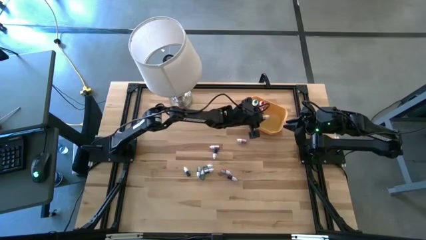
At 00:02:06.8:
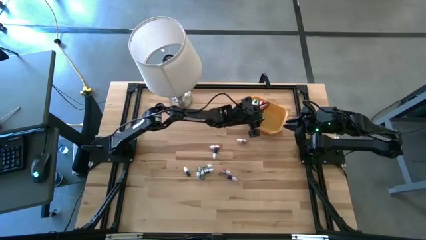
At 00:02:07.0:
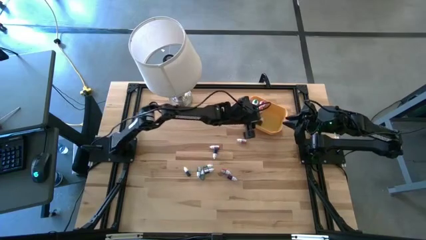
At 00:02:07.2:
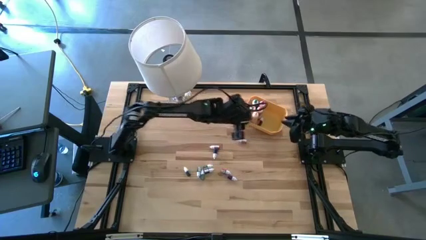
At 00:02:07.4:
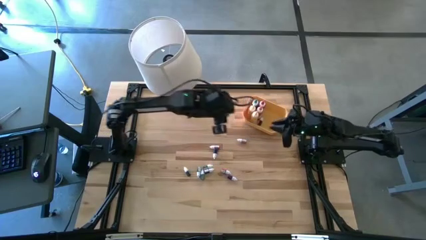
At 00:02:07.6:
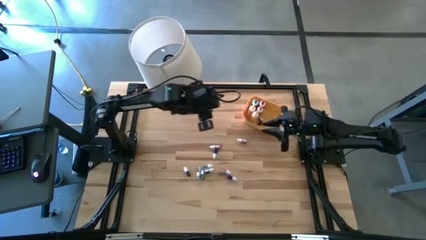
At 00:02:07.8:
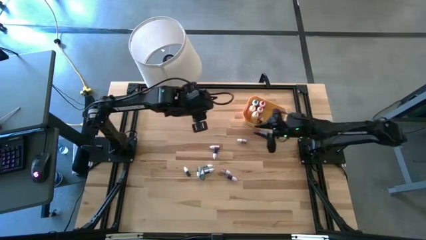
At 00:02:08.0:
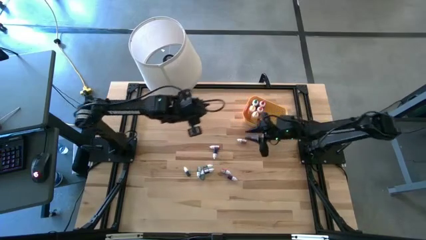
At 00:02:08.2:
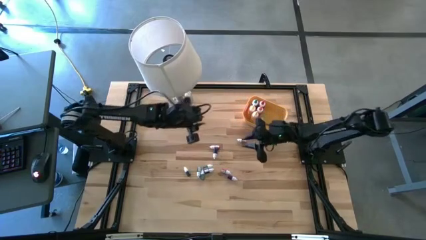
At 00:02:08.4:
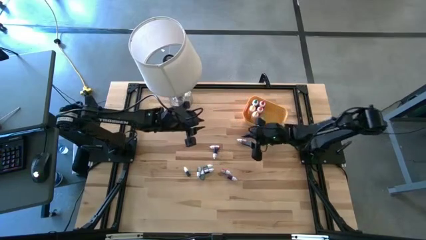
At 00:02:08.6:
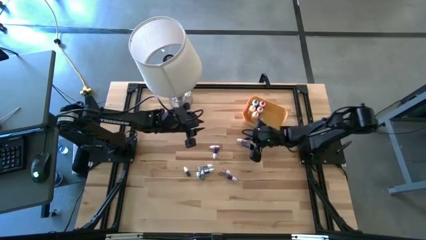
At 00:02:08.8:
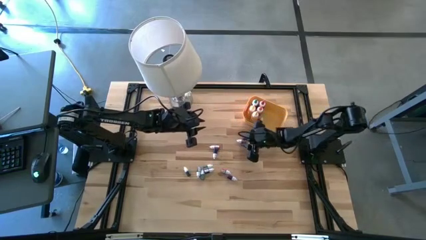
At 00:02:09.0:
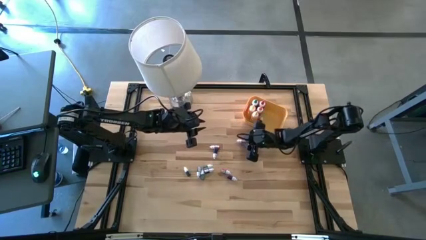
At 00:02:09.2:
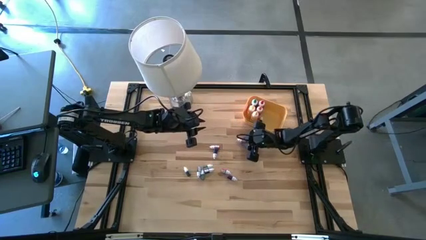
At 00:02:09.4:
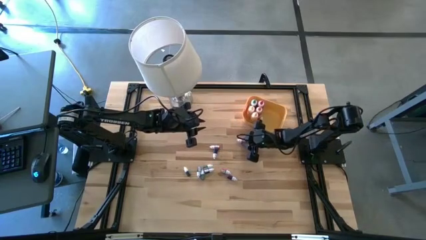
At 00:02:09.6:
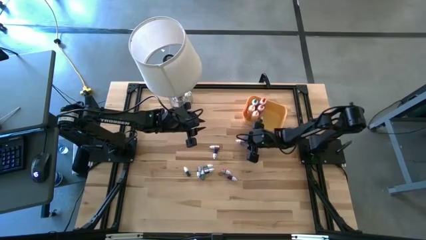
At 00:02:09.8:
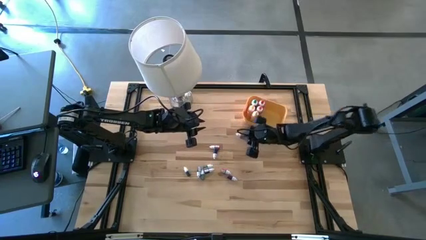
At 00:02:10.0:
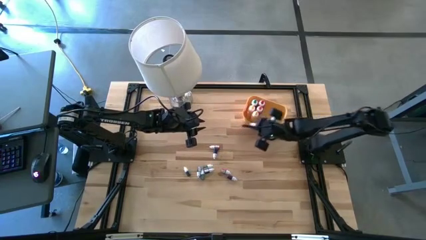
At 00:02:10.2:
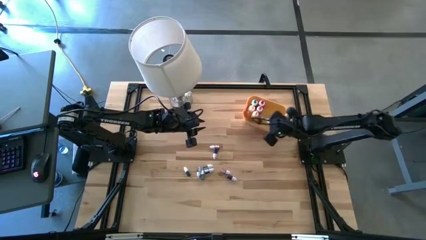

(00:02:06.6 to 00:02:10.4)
Task: Pick & Place food coloring
Put the small yellow food coloring bottle into the yellow bin

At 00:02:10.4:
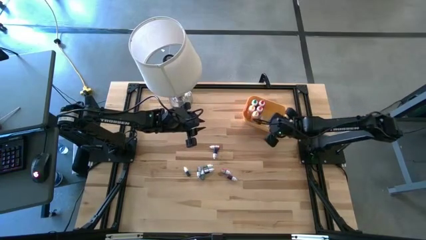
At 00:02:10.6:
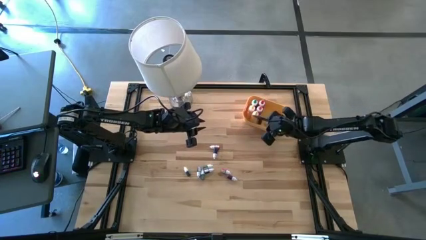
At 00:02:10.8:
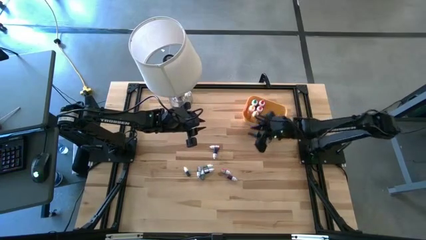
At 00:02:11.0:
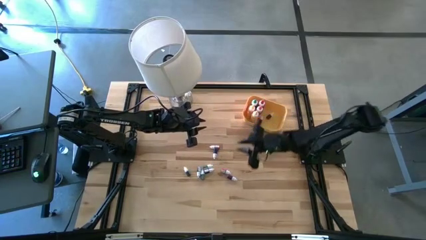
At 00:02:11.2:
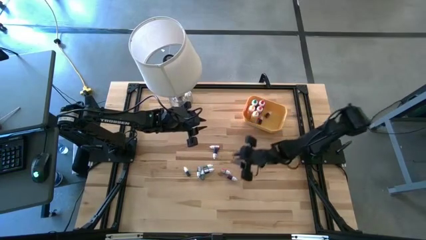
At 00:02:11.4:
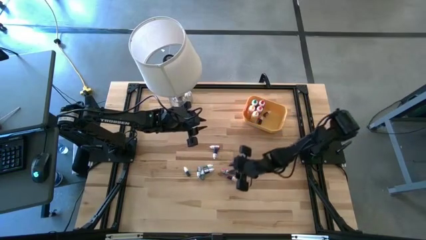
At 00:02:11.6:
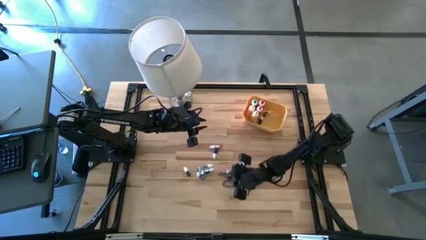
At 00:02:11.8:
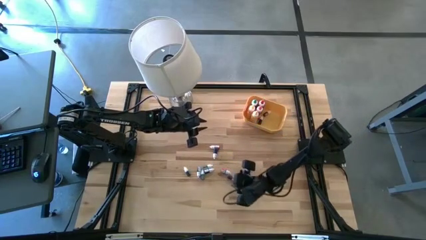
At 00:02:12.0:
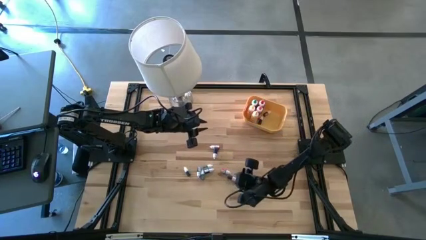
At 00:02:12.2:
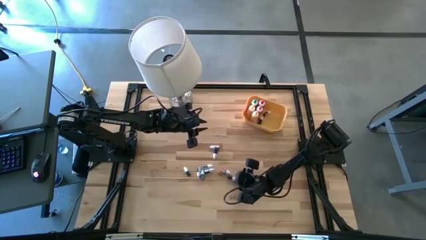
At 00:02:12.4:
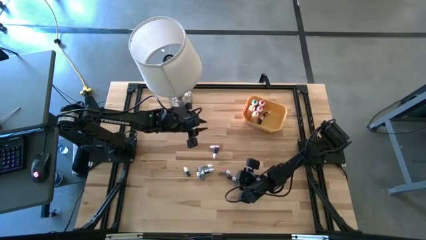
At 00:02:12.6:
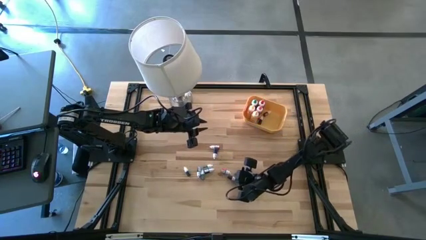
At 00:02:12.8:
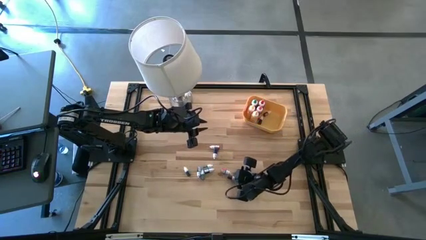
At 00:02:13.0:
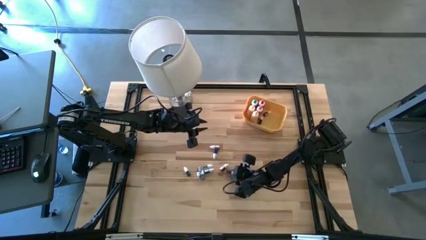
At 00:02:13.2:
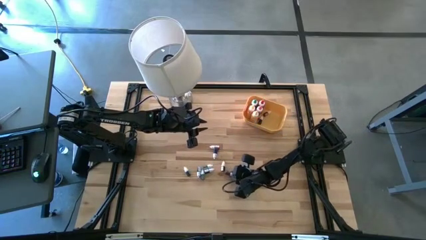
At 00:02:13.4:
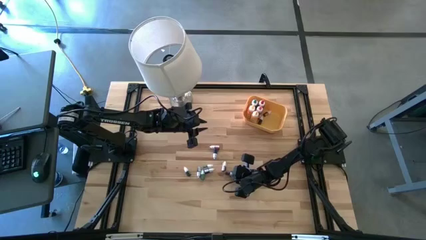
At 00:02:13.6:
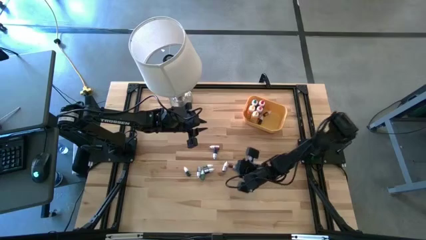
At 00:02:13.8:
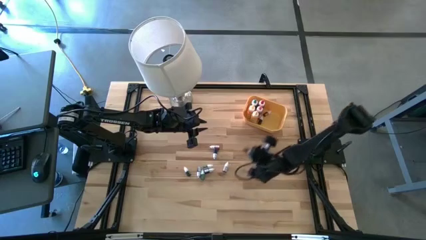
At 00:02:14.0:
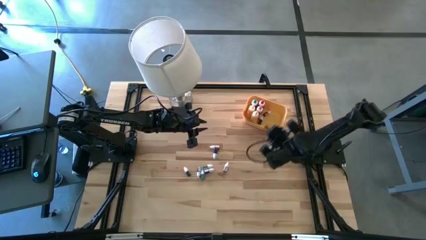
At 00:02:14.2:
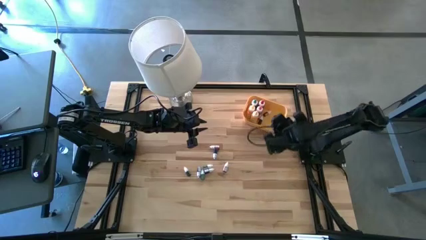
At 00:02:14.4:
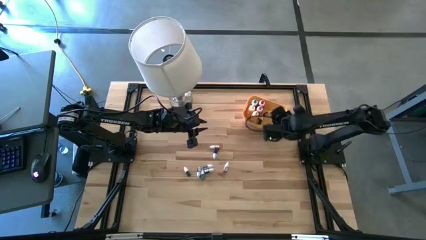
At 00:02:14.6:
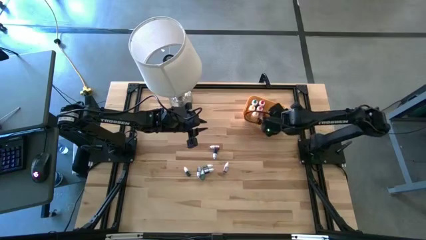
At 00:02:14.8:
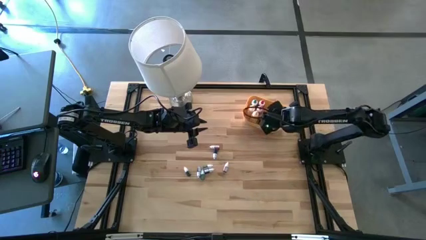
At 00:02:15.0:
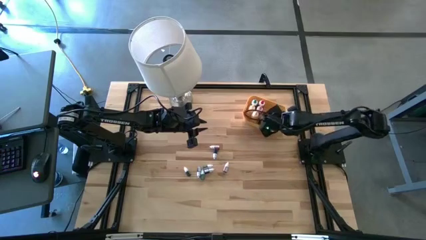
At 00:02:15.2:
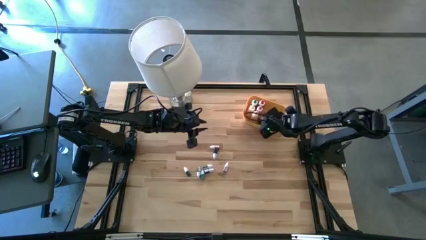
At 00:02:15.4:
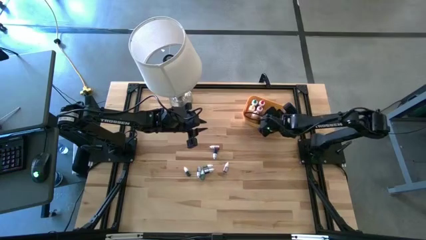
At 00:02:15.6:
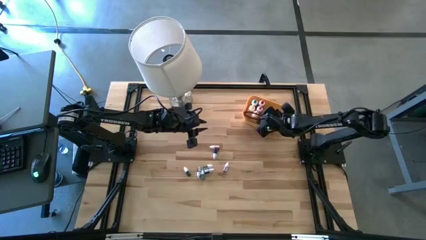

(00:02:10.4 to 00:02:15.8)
Put the small red food coloring bottle into the yellow bin

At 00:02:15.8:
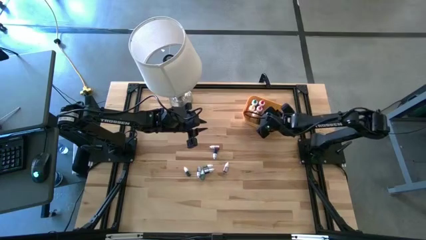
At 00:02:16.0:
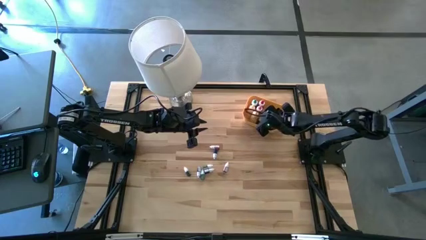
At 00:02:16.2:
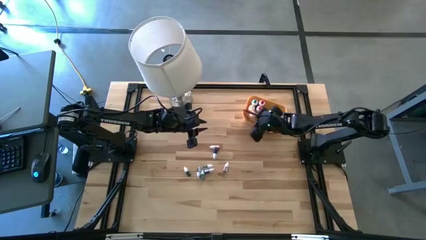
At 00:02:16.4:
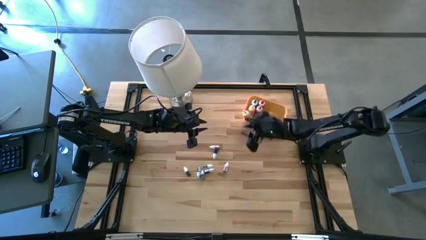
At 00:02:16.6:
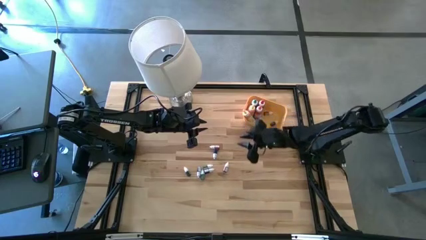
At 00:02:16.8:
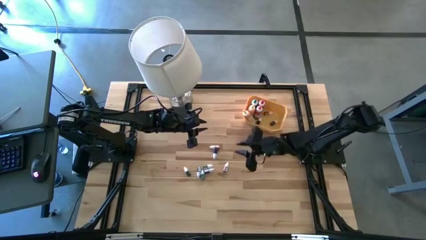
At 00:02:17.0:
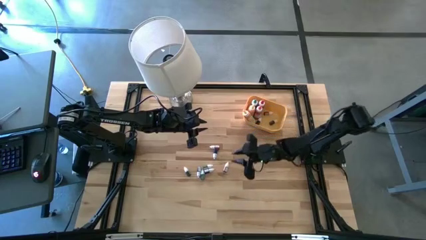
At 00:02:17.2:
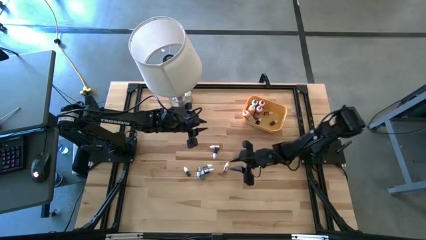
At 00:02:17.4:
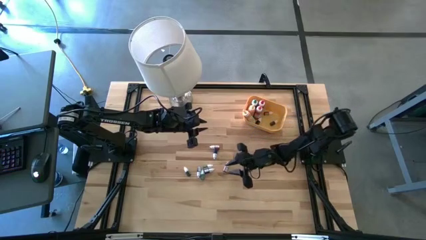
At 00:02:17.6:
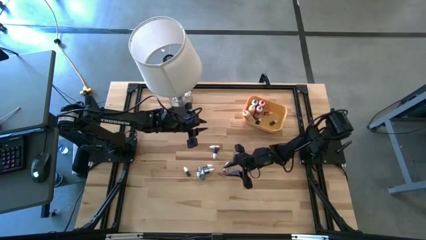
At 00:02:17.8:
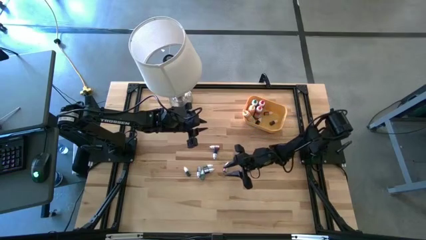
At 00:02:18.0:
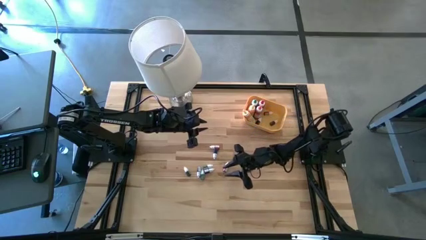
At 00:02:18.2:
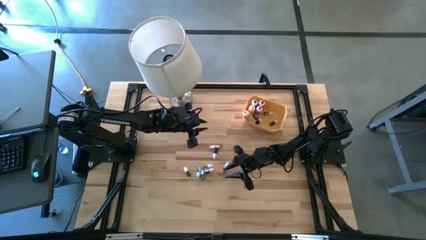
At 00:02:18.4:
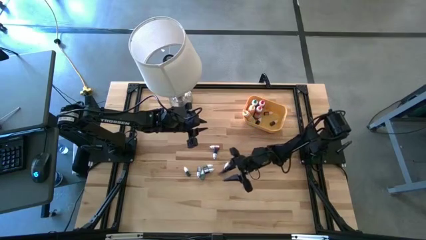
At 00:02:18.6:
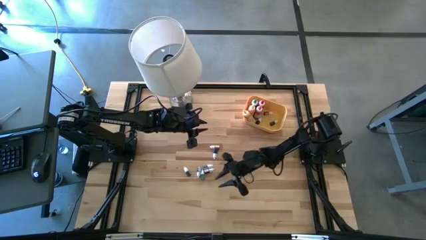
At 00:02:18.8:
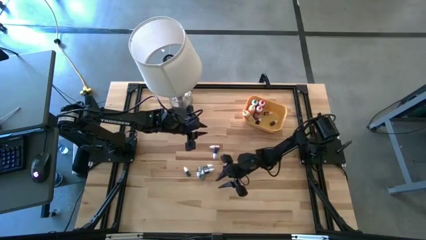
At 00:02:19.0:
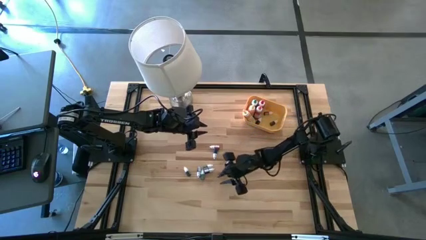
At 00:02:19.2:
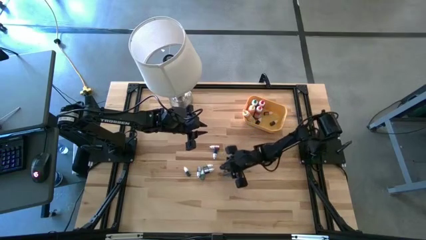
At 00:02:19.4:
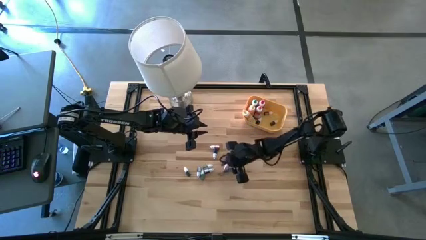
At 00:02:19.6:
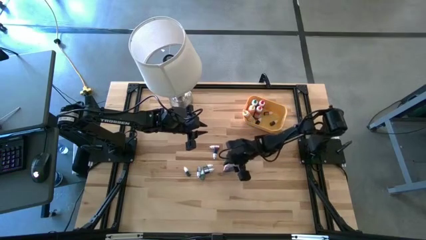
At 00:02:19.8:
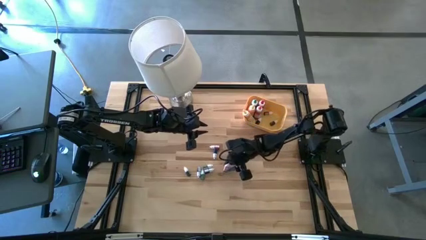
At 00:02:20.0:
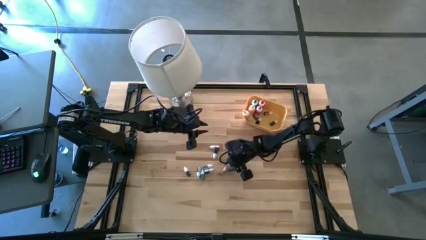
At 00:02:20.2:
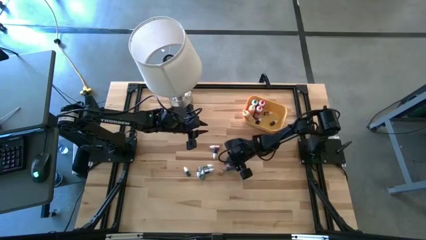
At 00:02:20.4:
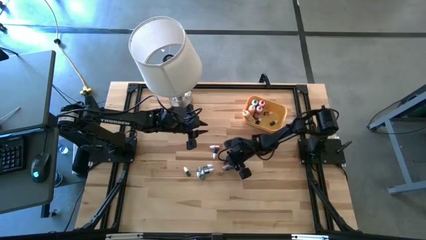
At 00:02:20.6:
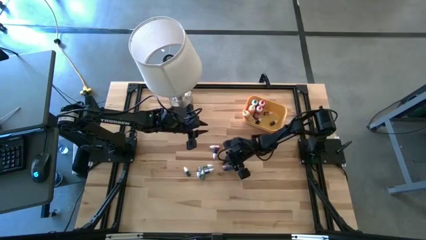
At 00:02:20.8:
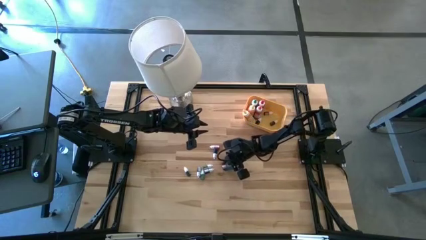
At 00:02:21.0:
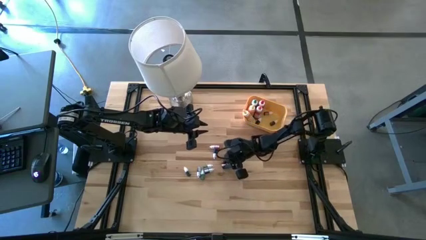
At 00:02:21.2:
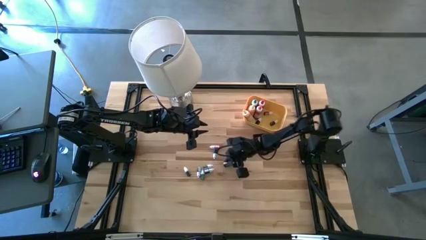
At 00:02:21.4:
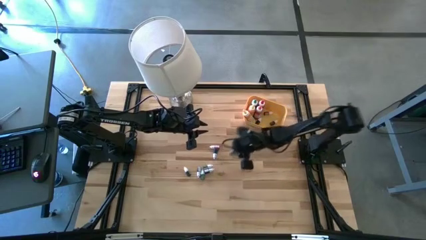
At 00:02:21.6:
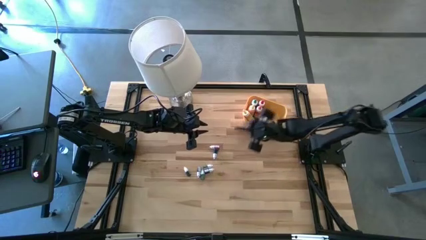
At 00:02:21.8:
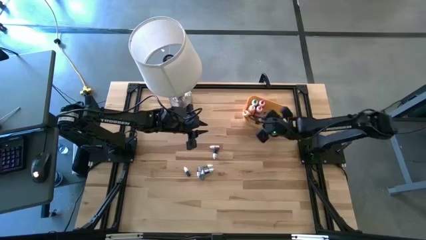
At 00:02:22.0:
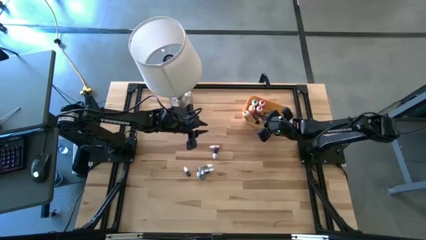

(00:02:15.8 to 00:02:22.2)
Put the small red food coloring bottle into the yellow bin

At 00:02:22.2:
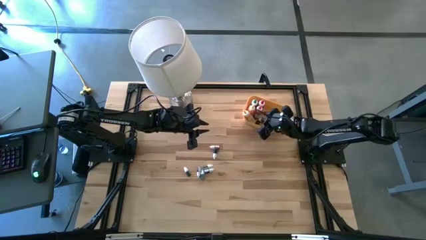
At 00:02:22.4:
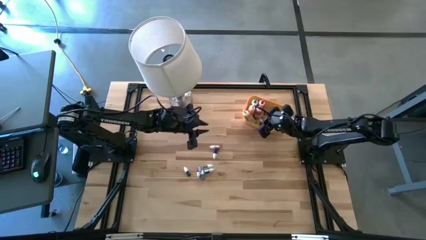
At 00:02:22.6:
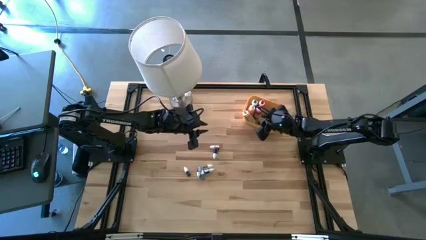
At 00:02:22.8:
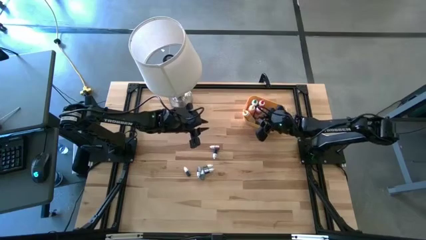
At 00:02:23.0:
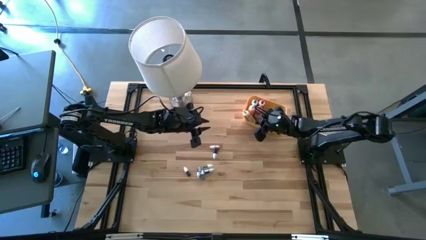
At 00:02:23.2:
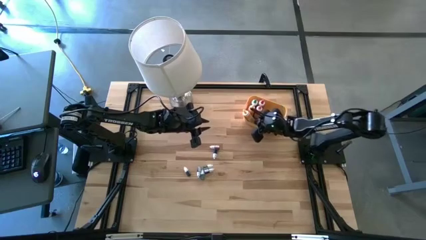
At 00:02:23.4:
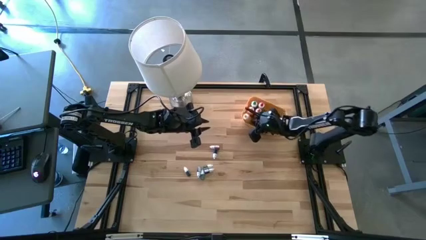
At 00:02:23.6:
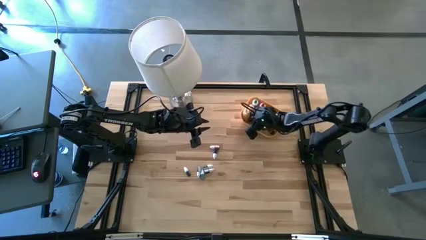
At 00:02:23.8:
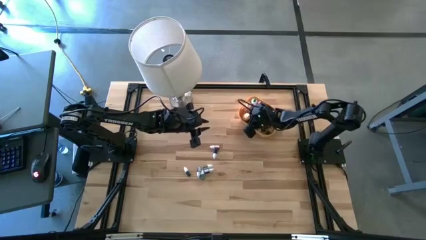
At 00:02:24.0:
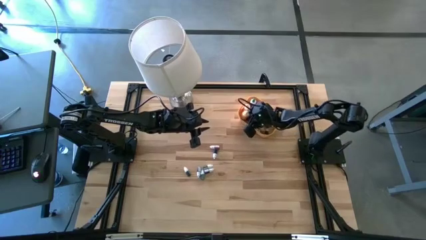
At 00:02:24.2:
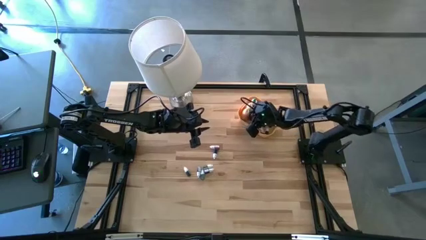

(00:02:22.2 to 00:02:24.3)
Adjust the food coloring bottles in the yellow bin
